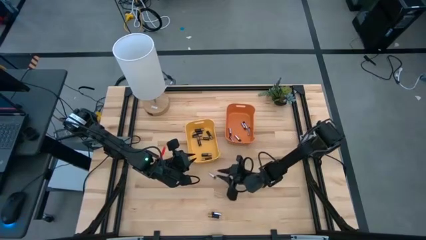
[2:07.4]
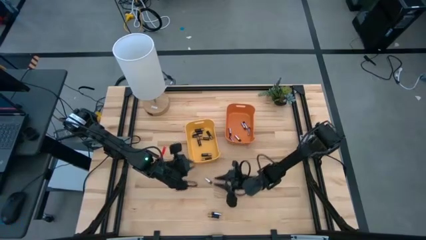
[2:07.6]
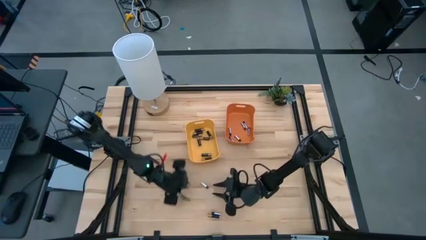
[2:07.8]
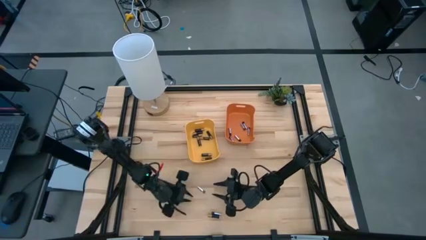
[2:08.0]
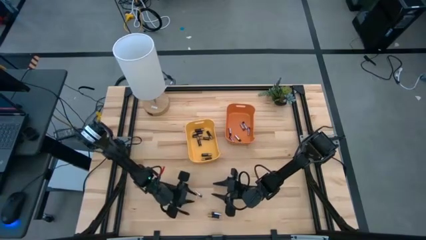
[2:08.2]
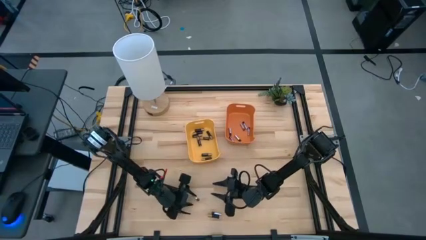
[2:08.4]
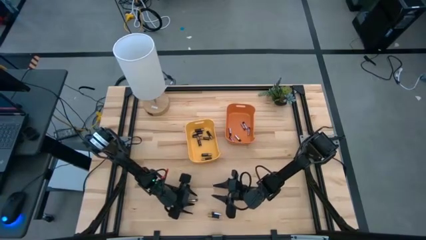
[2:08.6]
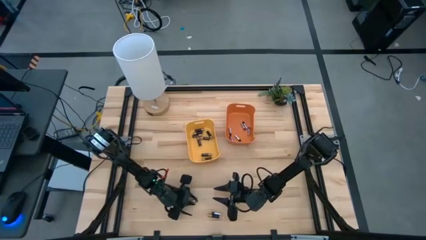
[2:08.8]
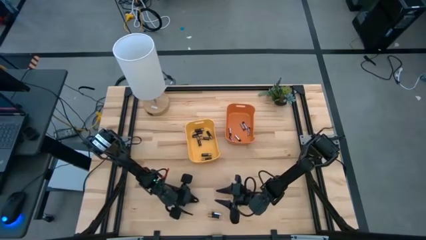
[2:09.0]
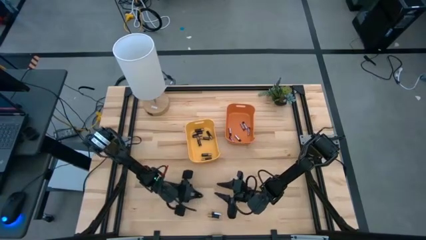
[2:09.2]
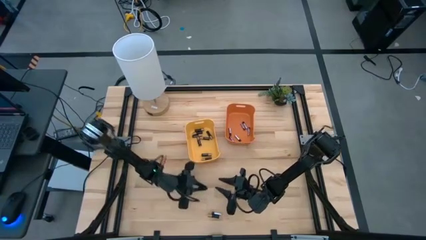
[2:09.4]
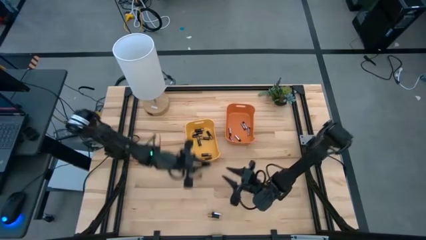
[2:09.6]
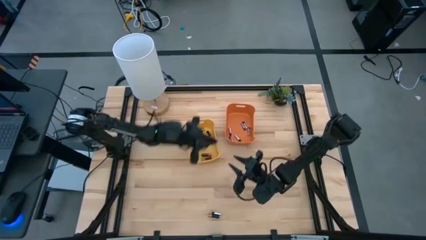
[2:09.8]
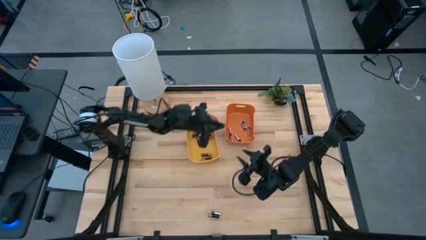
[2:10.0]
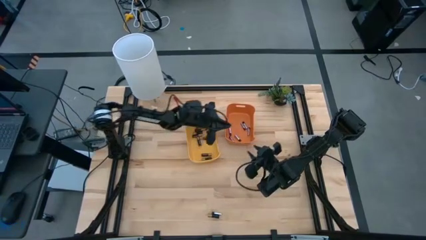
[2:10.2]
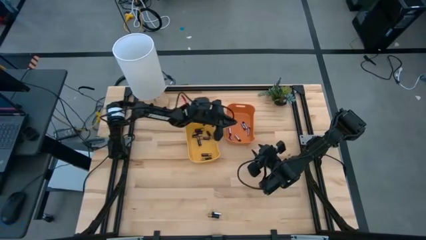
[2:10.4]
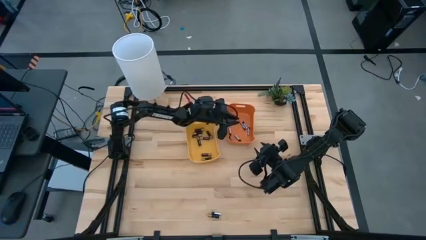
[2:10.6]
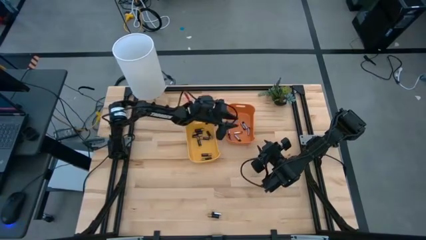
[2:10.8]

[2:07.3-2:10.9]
Task: Sort batteries
Put the center silver battery into the orange bin

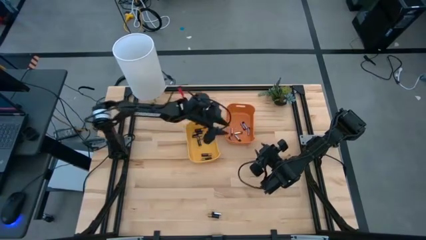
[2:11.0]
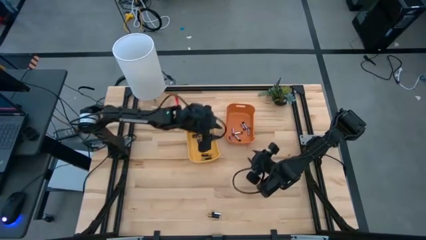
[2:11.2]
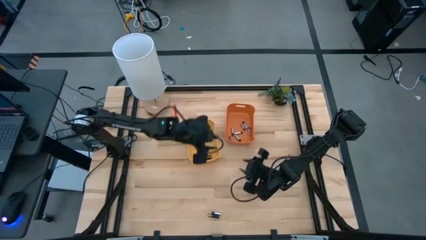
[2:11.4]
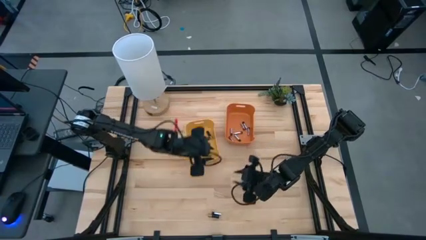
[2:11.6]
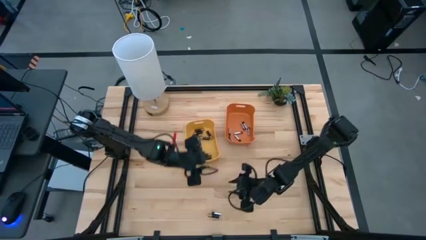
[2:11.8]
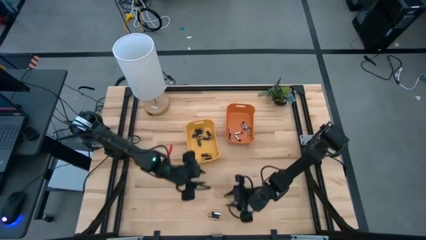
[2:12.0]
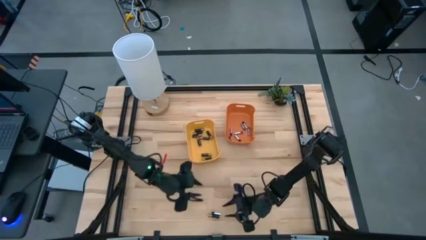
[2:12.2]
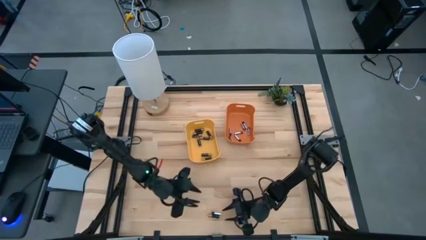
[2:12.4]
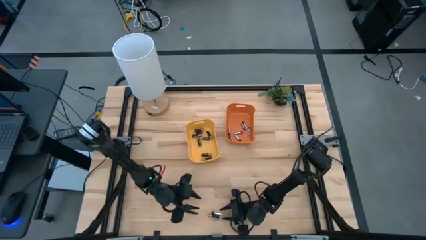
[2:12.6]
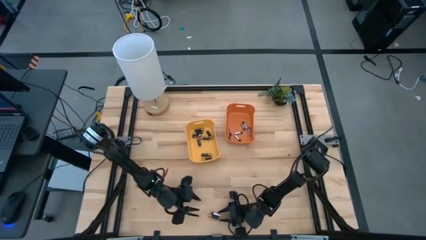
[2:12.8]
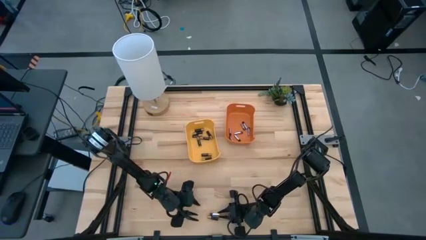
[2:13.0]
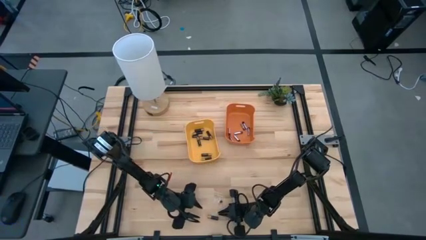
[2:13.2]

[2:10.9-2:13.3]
Put the bottom silver battery into the orange bin

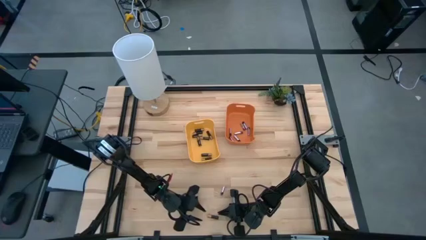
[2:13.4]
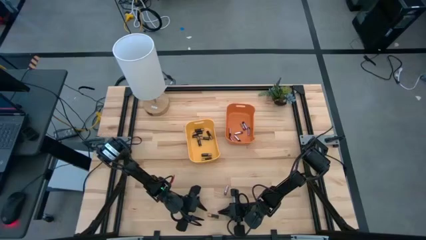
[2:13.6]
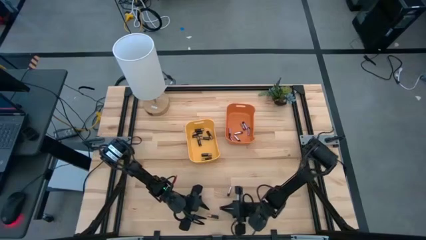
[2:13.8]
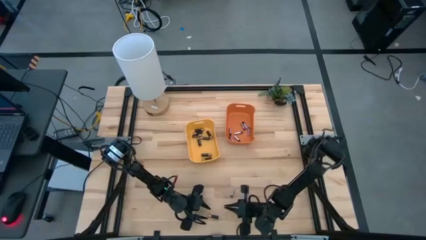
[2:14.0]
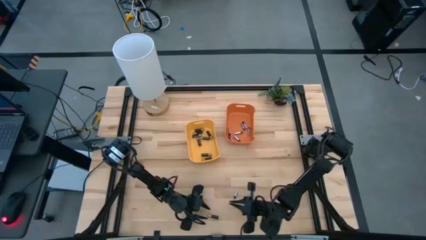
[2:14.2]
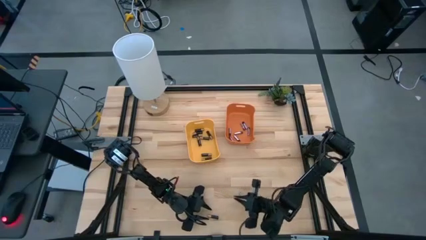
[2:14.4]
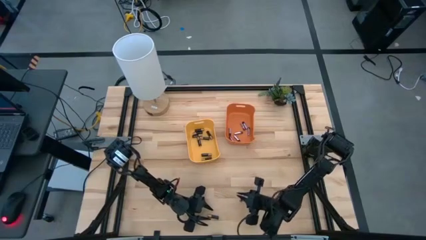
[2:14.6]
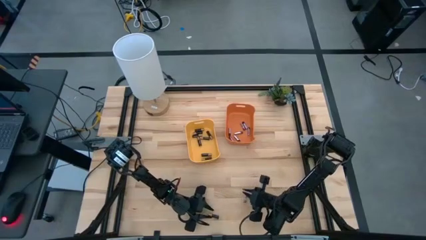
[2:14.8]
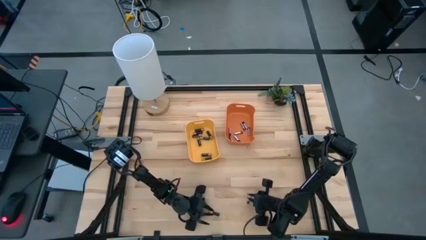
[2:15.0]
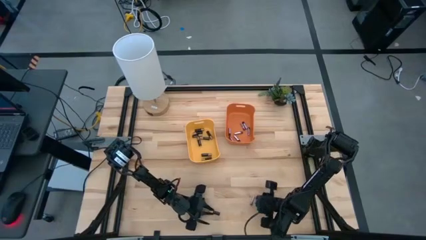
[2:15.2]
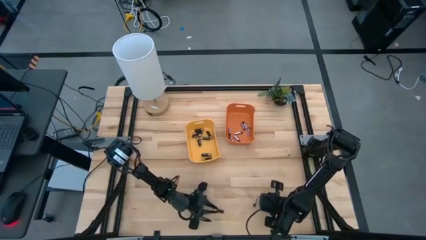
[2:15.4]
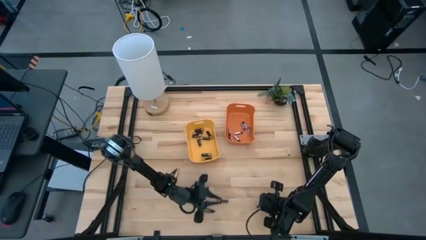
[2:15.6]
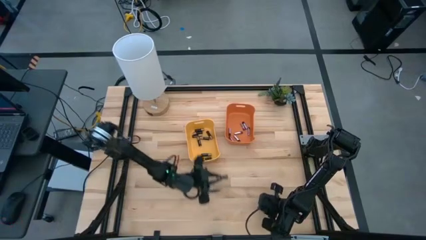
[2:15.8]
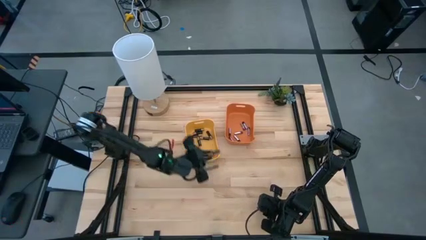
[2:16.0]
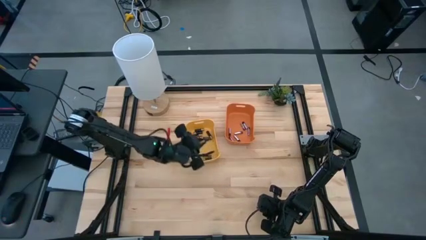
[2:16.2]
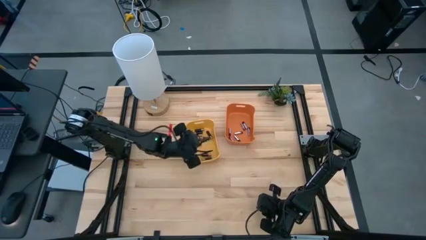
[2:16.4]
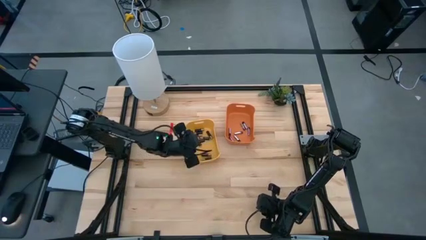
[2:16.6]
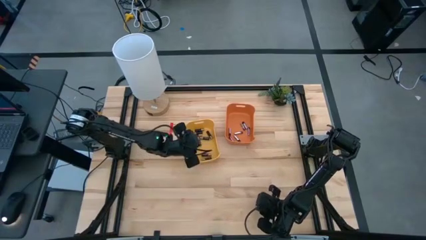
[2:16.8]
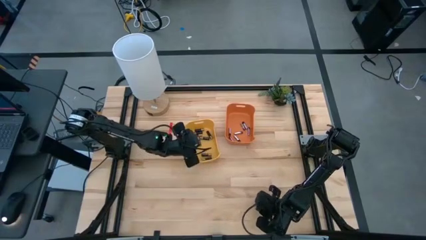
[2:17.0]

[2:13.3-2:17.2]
Put the black battery into the yellow bin

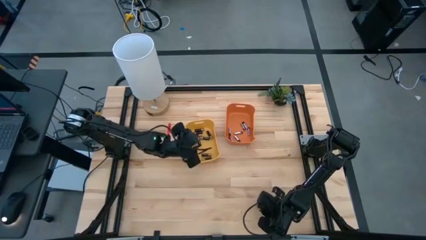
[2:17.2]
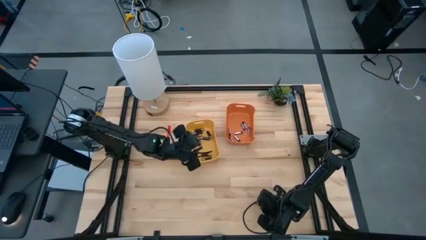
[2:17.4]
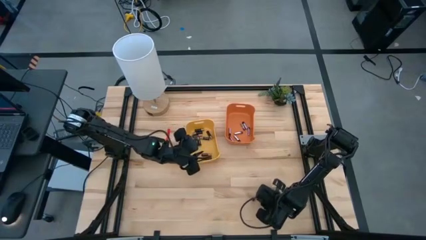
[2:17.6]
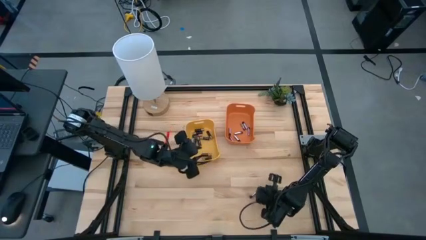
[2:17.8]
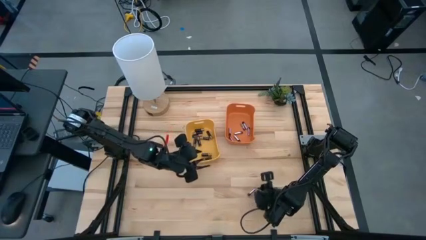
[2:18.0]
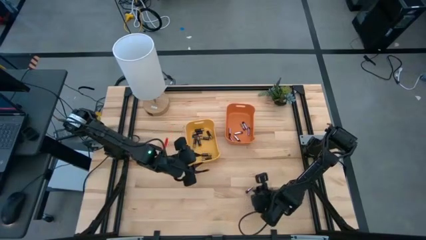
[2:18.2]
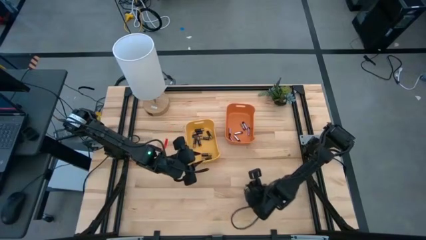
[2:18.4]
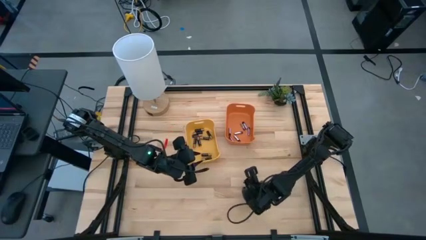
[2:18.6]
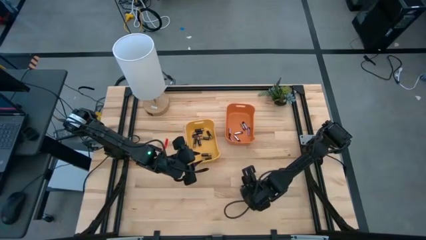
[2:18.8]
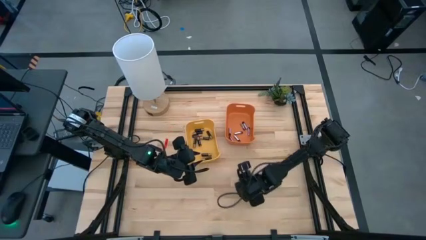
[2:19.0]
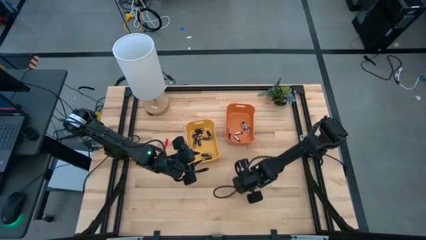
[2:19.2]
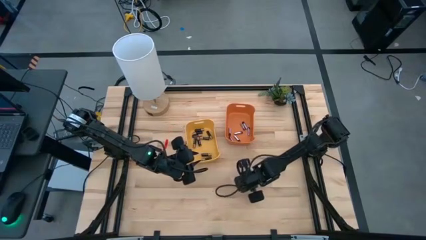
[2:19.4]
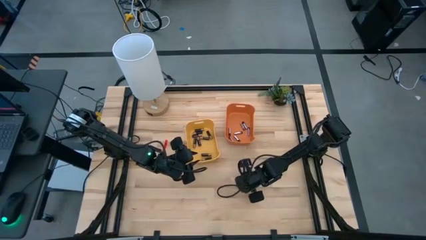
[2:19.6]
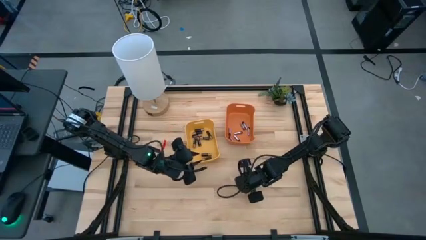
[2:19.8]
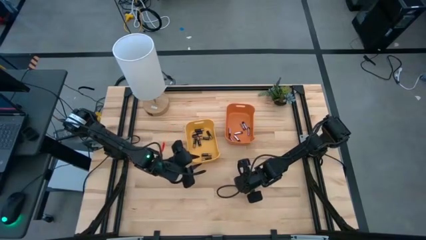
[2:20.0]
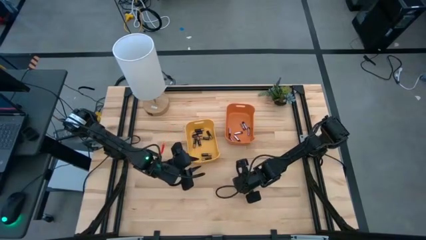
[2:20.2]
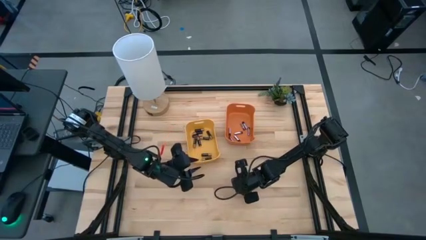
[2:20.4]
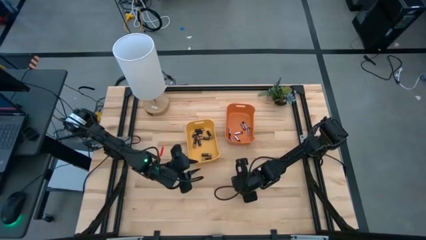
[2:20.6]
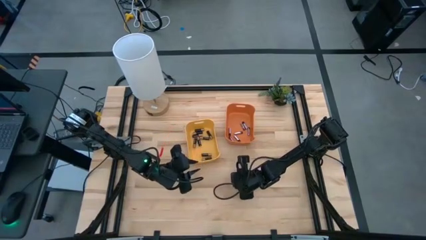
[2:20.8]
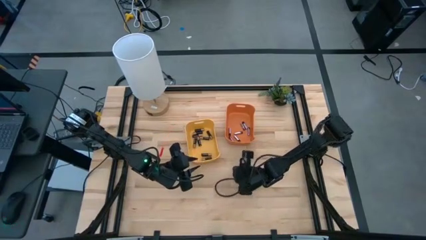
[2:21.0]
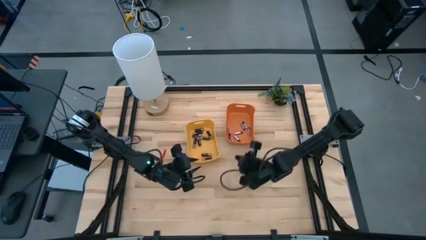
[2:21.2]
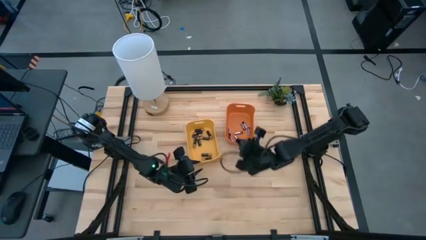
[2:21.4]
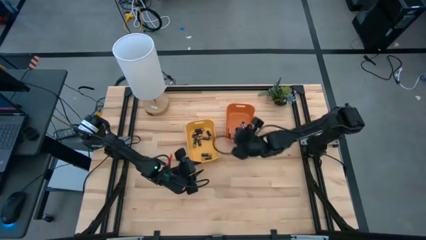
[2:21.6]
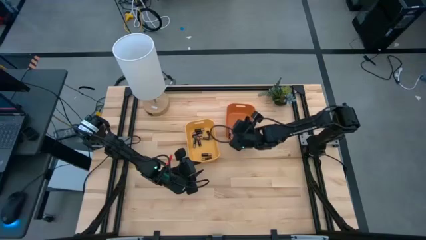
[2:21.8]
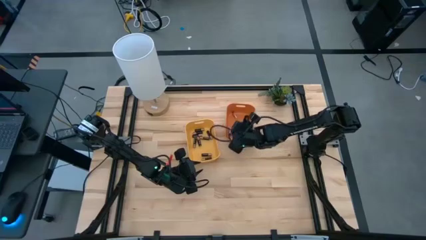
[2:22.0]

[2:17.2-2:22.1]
Put the bottom silver battery into the orange bin

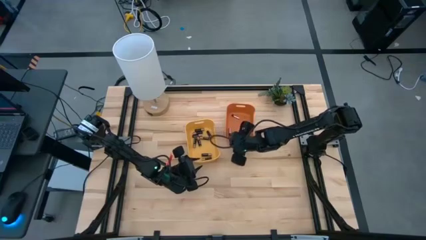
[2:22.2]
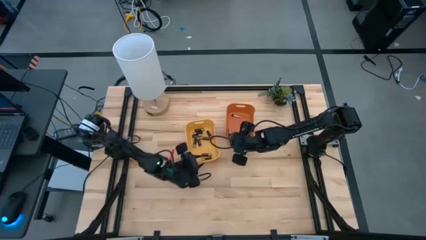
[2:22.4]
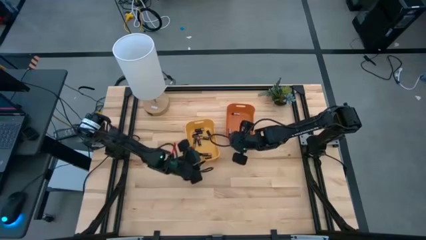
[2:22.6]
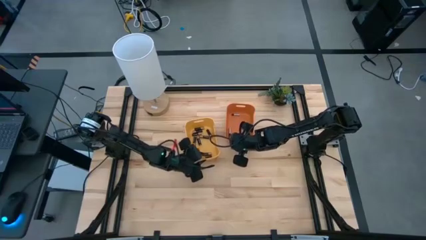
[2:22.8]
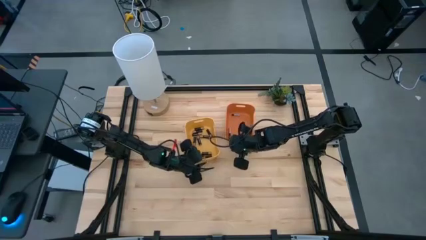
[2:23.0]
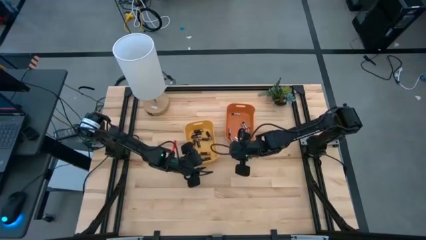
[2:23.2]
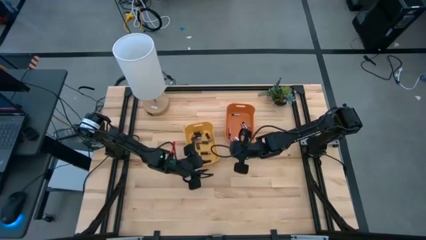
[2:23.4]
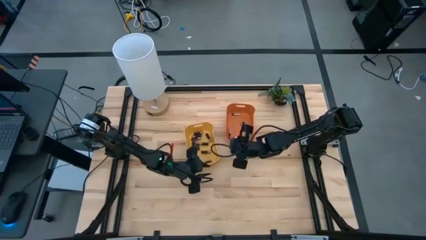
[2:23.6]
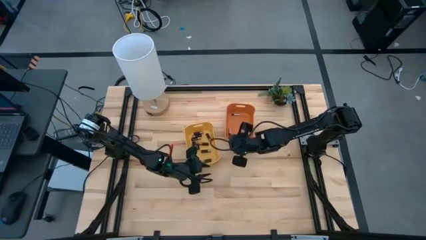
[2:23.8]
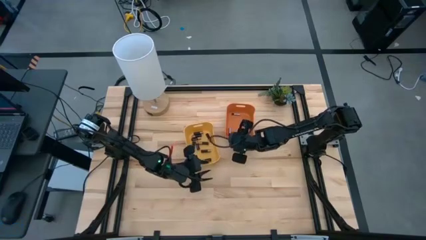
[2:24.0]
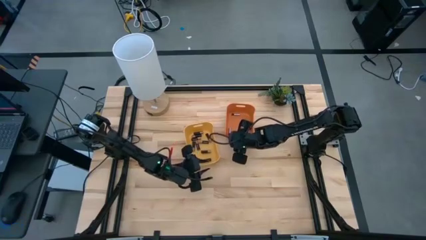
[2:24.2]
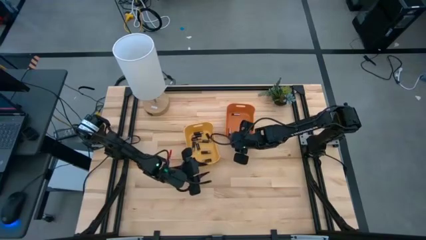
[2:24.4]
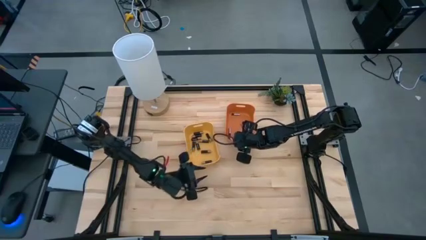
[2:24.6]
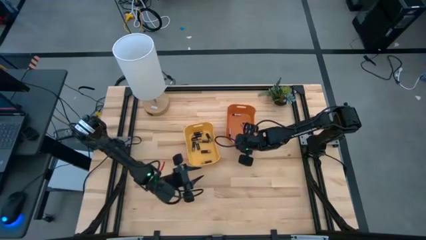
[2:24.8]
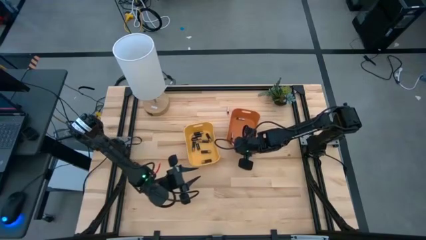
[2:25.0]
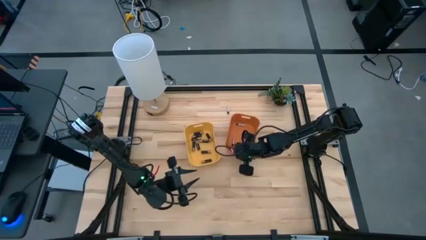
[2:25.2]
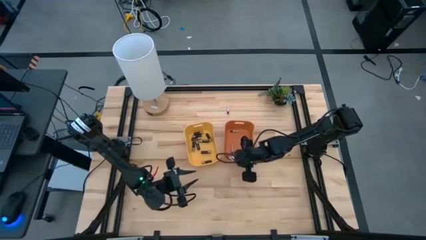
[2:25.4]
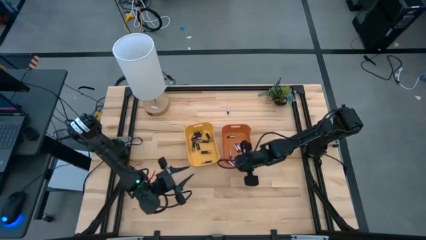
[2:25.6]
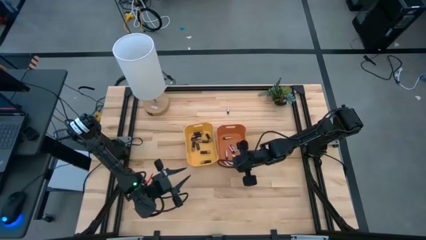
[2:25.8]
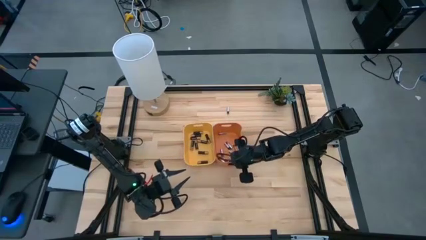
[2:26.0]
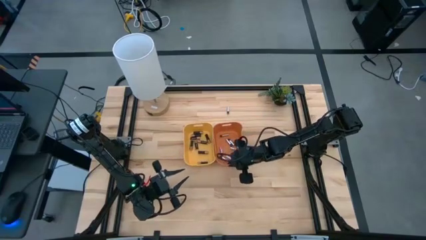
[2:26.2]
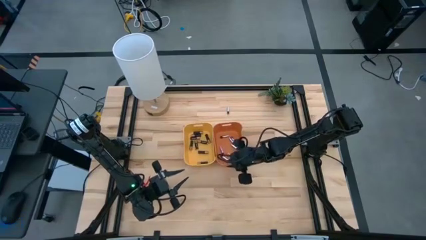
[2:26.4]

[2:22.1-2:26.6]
Move the orange bin to the center of the table
